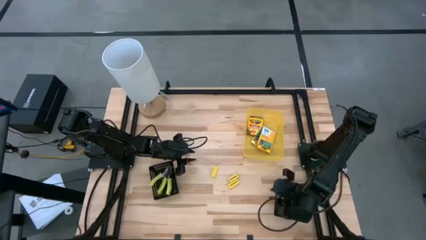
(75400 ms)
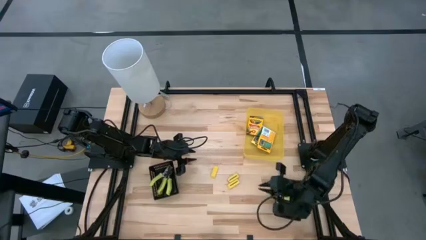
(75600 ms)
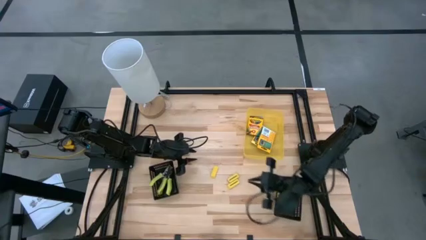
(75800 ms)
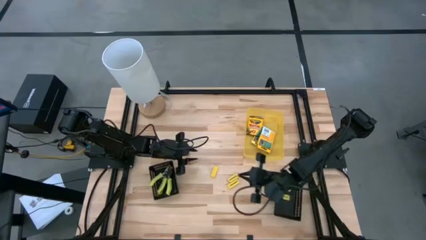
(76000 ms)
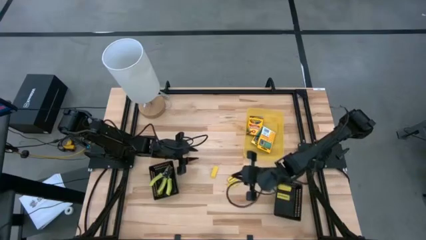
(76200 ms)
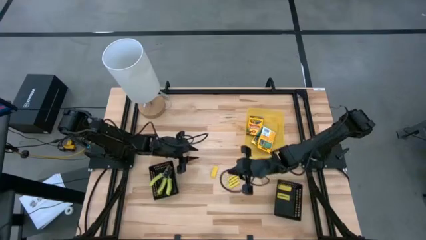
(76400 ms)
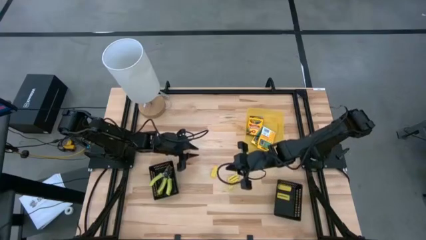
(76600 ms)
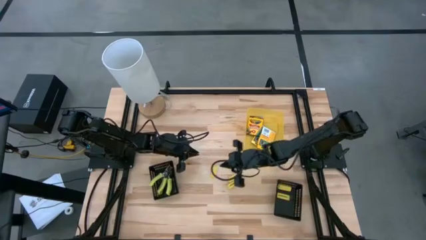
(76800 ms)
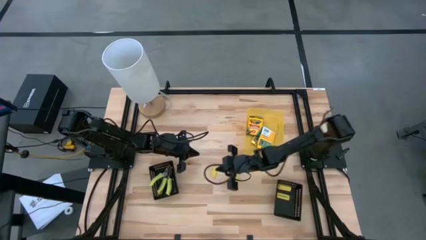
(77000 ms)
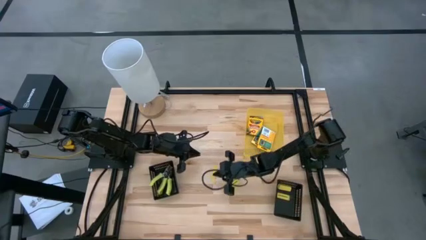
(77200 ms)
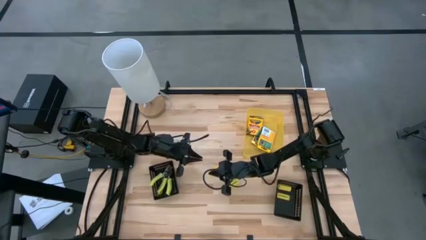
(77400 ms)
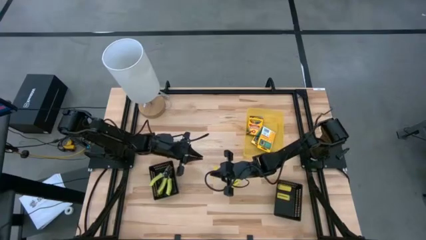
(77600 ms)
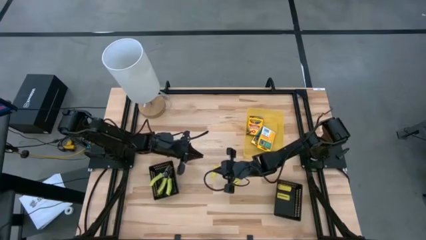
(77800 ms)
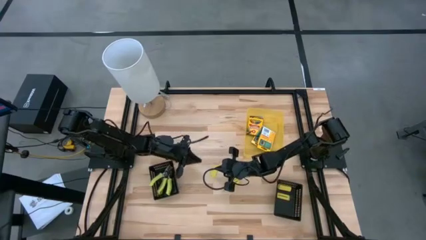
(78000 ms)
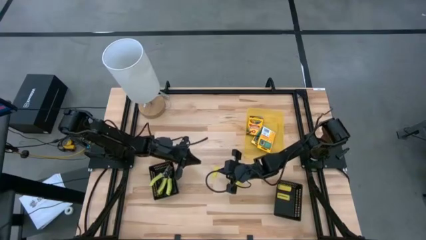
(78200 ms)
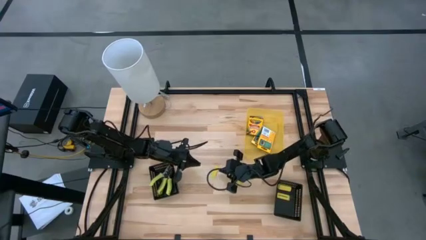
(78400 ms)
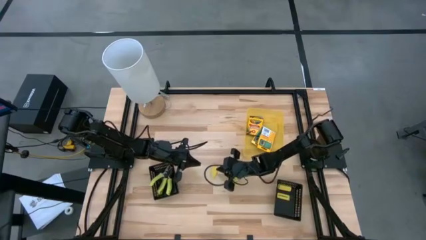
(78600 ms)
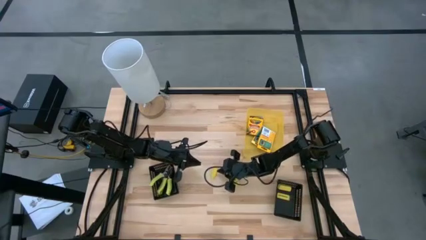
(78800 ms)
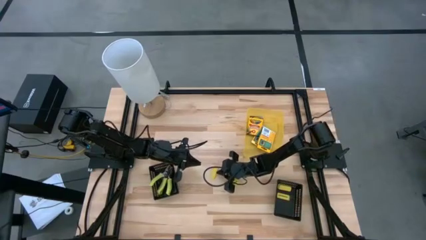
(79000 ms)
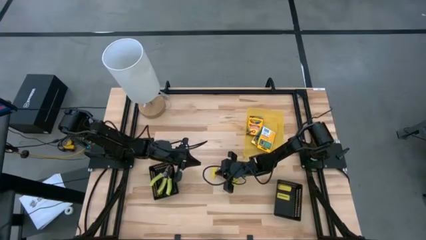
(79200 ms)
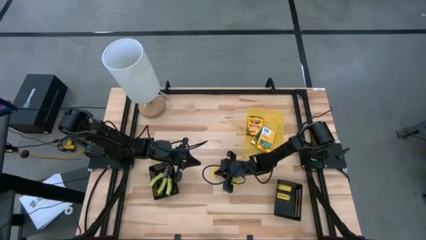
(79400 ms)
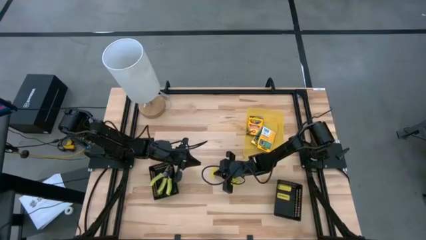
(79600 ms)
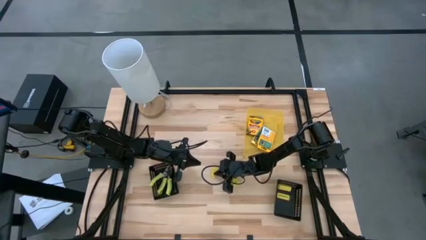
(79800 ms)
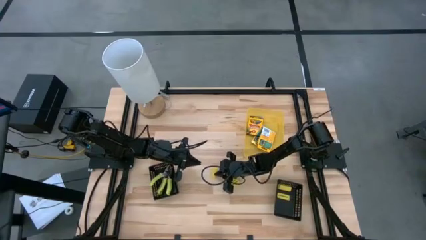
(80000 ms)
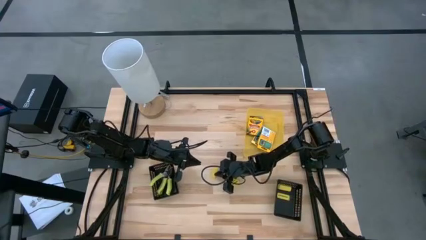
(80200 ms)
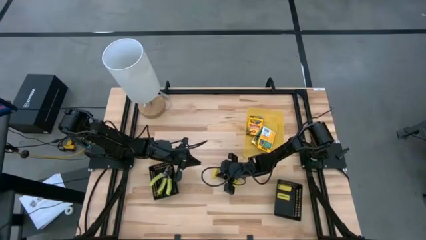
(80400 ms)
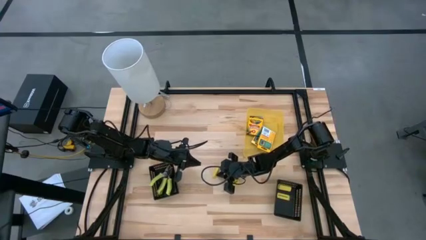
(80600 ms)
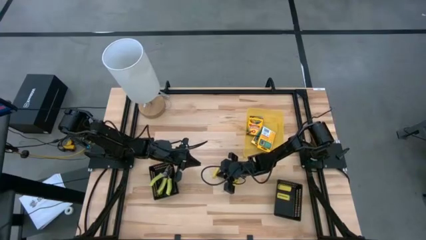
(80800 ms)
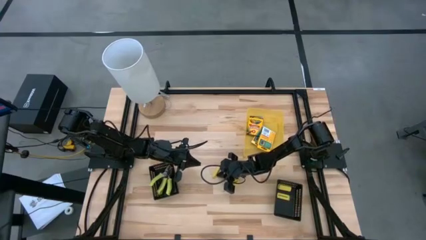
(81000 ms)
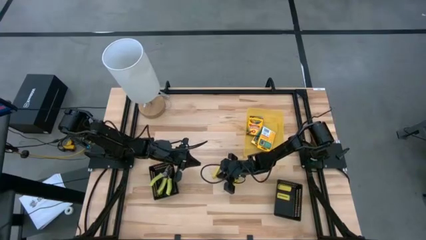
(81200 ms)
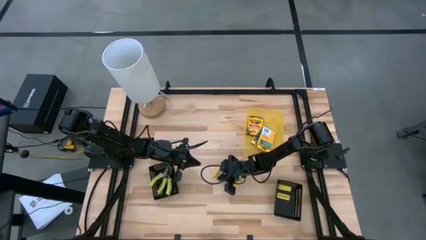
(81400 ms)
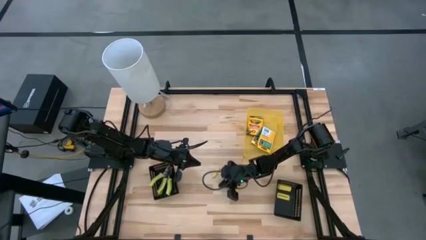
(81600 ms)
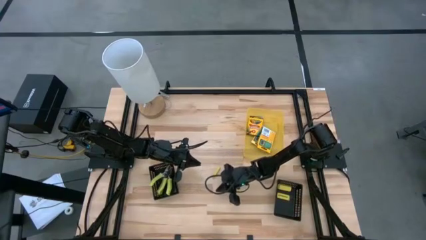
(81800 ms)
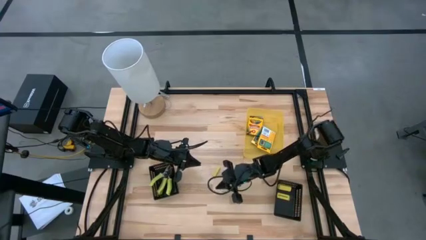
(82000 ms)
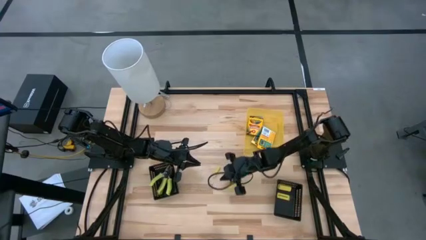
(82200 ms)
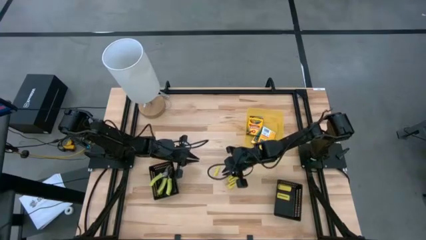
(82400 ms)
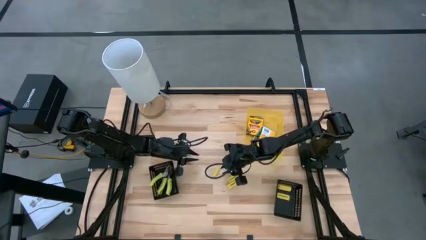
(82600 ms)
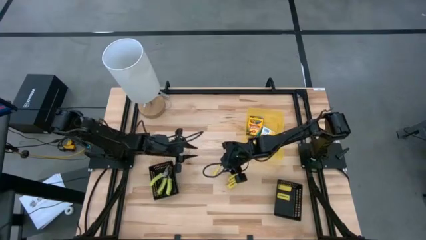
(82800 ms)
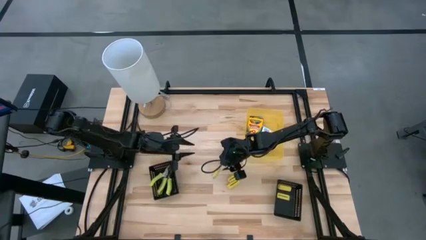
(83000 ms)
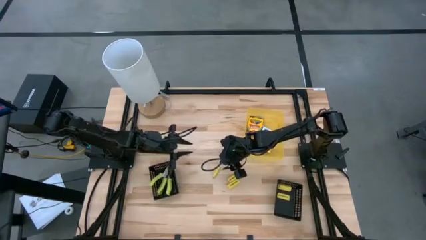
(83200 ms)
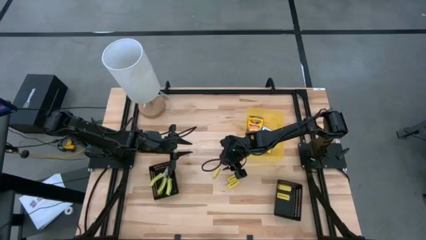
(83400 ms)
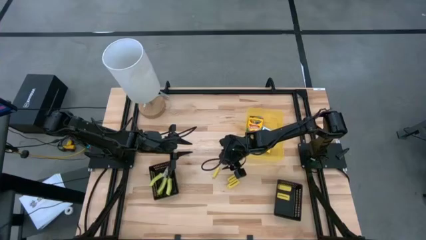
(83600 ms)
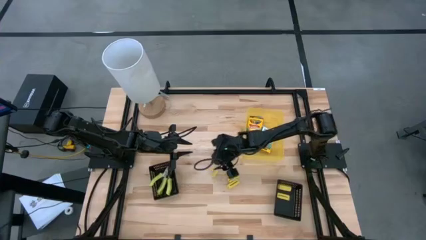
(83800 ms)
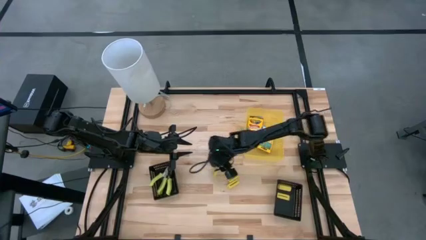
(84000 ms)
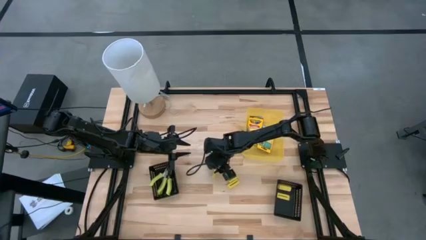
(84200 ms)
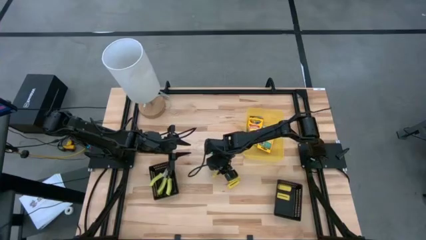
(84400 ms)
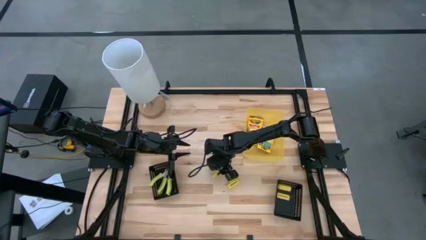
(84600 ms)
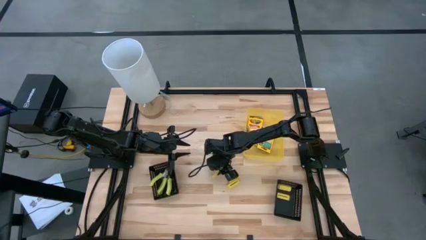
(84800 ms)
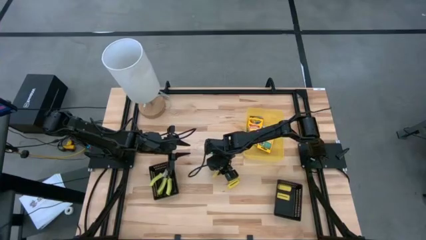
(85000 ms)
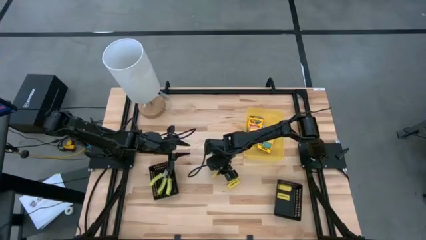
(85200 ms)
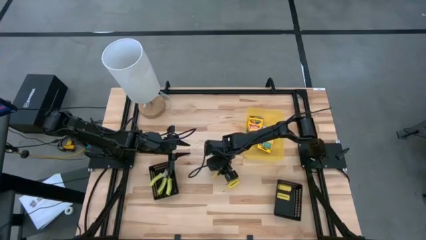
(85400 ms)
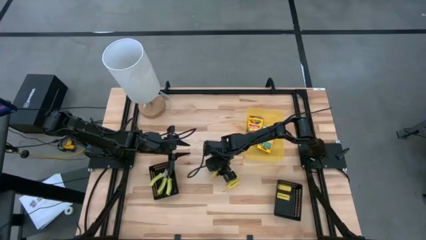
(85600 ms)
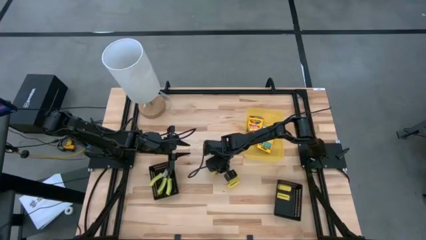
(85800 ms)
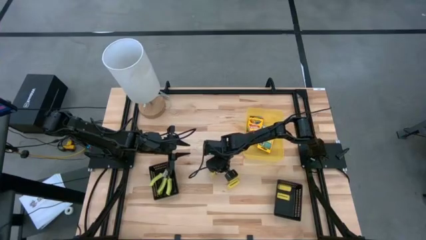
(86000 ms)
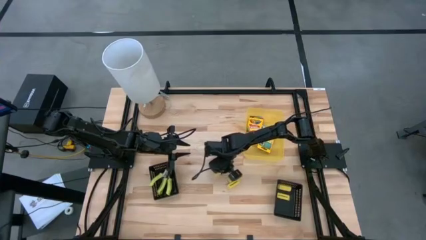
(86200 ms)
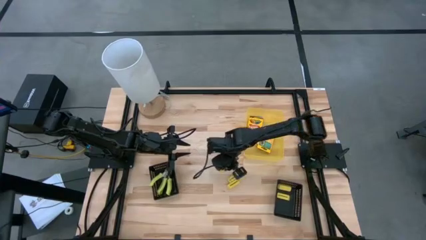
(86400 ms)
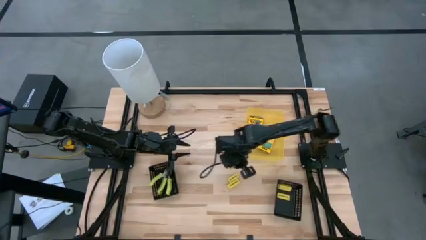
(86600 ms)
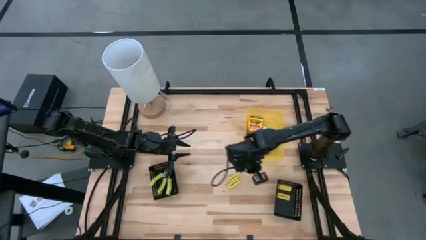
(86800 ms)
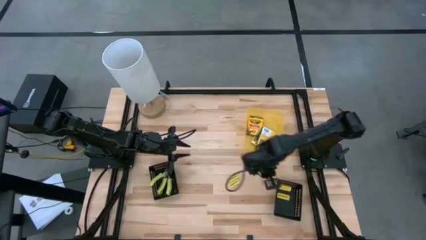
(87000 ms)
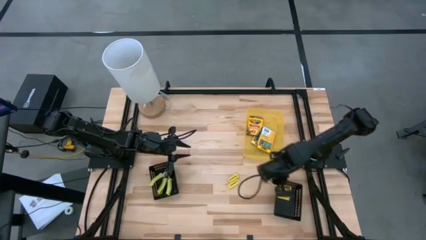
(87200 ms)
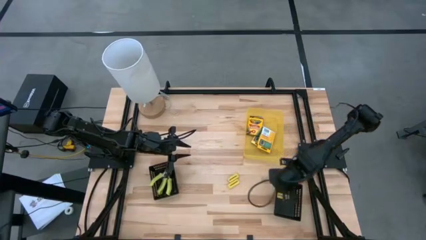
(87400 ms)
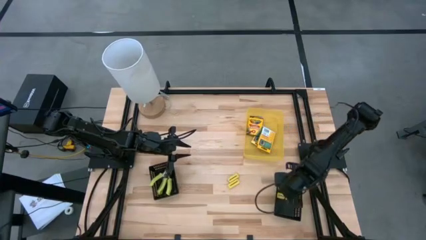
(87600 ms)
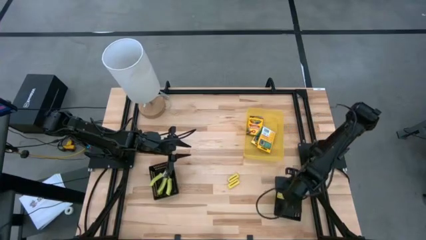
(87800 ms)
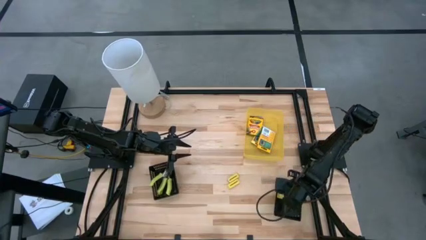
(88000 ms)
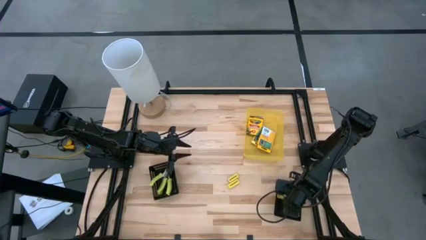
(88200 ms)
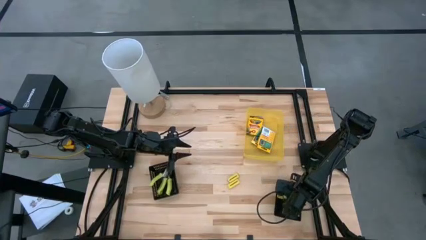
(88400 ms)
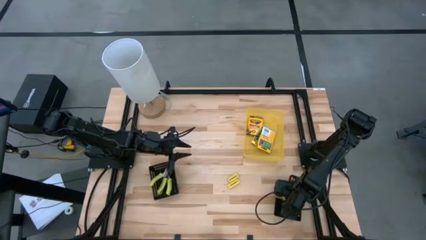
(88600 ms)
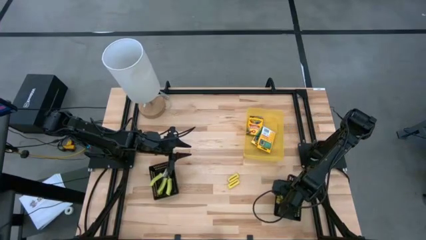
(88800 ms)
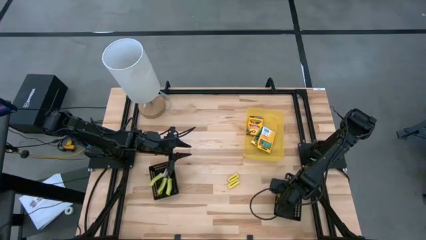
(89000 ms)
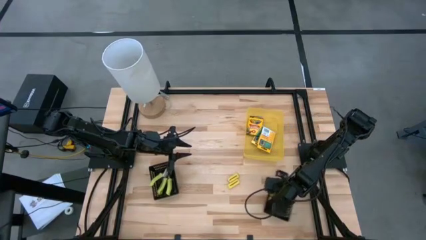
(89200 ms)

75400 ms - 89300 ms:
Task: Pick & Place School Supplies
Put the eraser into the right black bin

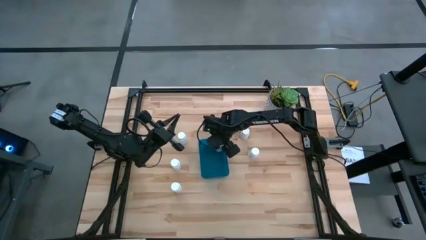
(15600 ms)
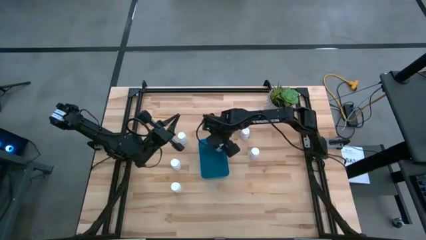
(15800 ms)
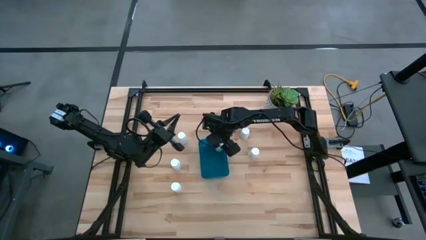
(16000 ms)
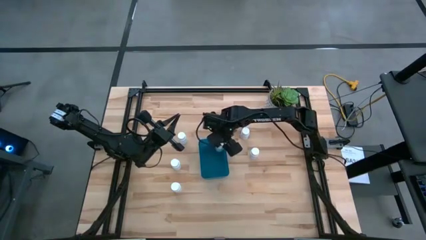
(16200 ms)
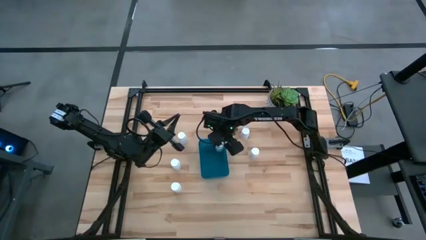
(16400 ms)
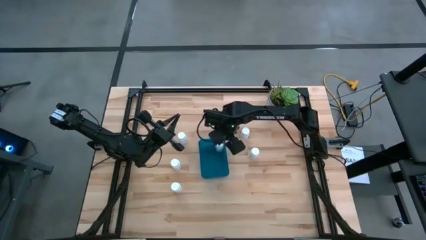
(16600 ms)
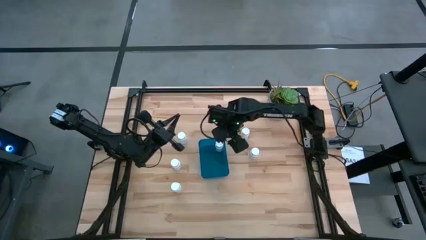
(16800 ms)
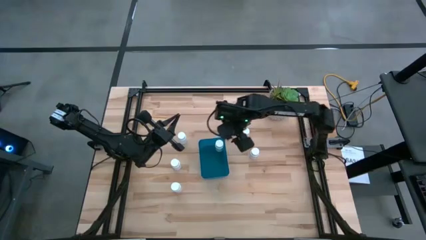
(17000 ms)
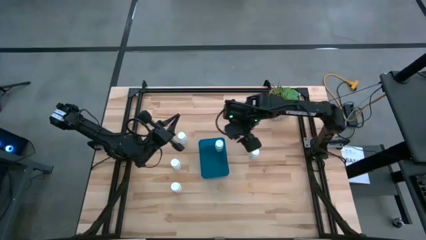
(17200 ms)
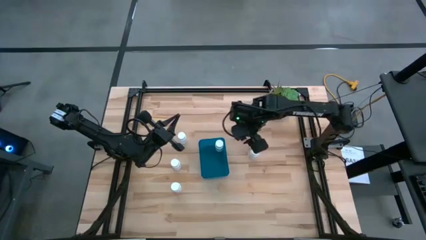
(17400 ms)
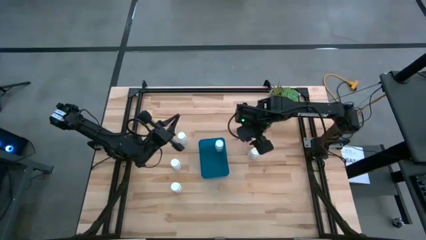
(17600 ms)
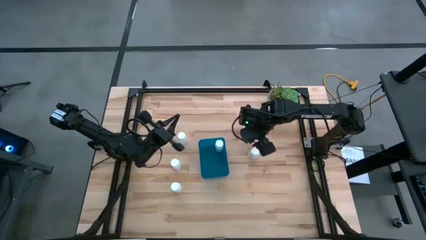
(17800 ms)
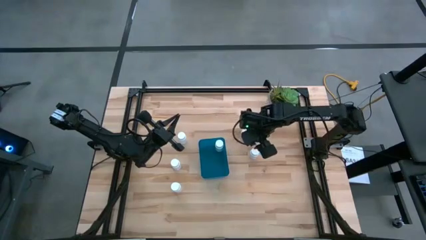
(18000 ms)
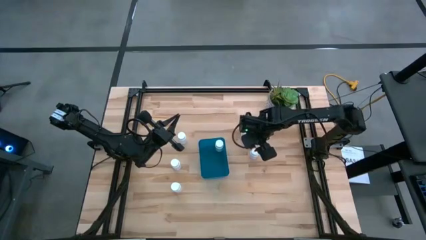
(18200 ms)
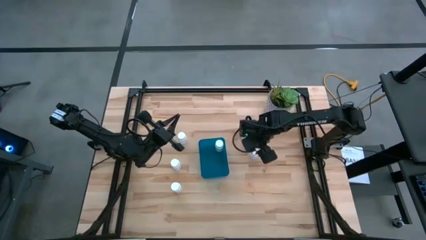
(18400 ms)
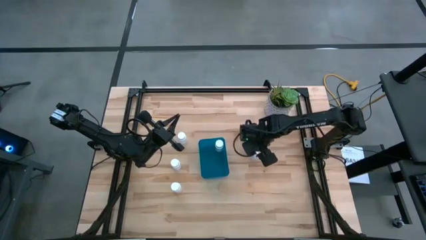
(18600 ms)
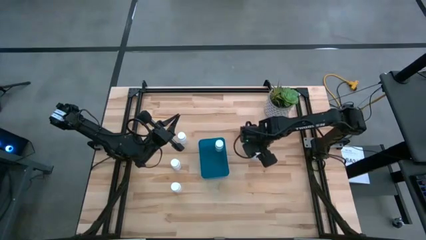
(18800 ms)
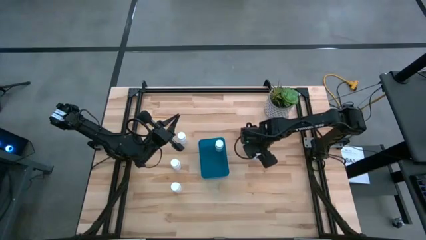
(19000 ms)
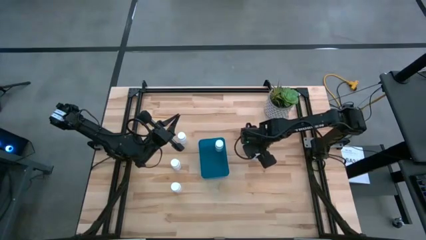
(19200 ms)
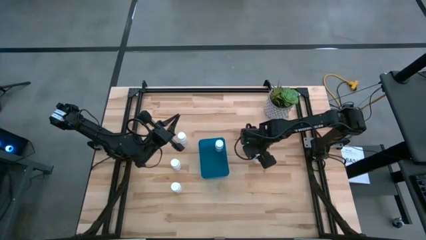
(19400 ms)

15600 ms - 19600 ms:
Task: Pick and place pill bottles into a basket
Put the white pill bottle into the blue bin
